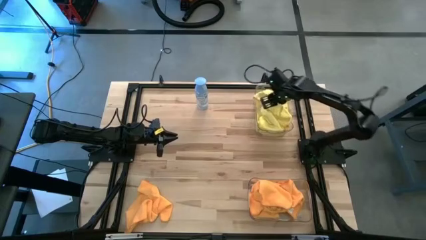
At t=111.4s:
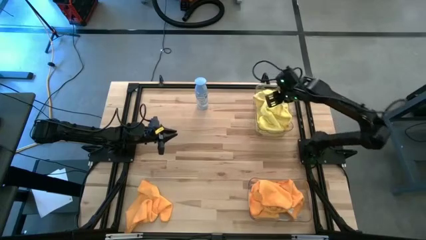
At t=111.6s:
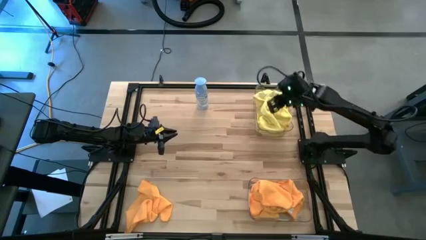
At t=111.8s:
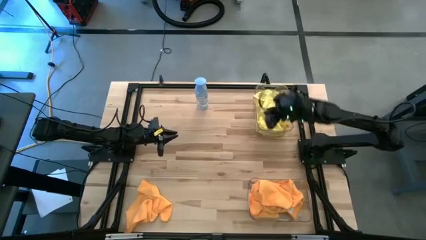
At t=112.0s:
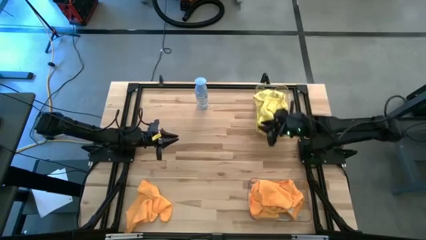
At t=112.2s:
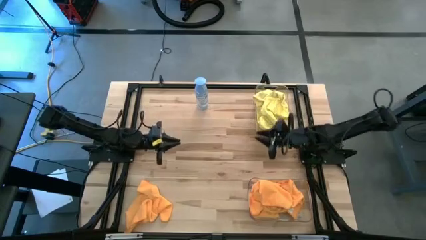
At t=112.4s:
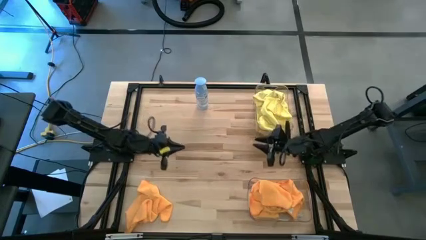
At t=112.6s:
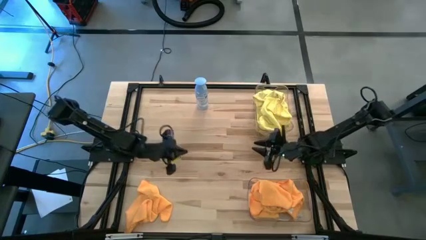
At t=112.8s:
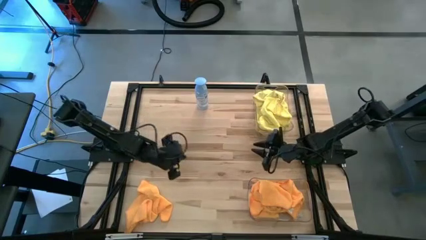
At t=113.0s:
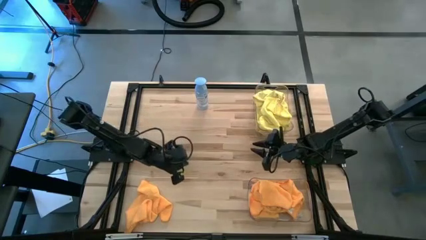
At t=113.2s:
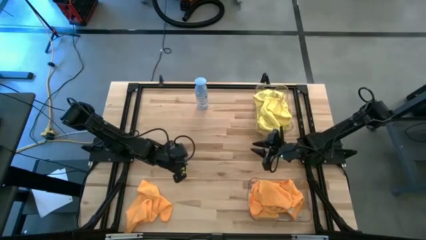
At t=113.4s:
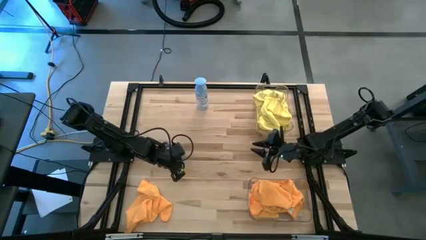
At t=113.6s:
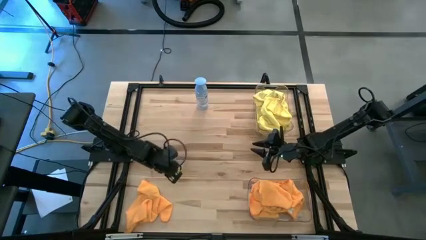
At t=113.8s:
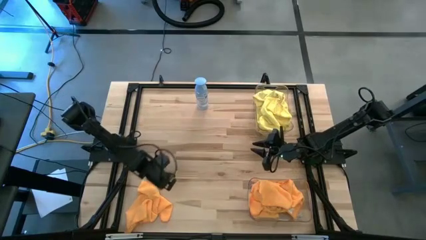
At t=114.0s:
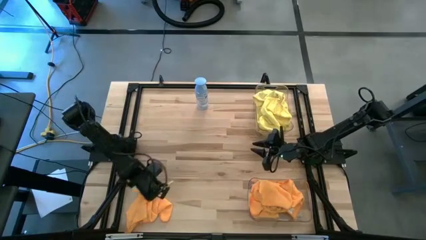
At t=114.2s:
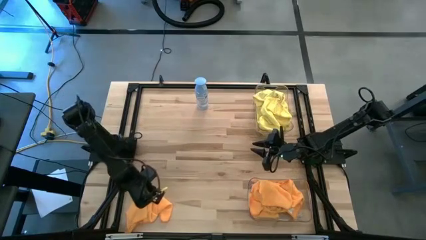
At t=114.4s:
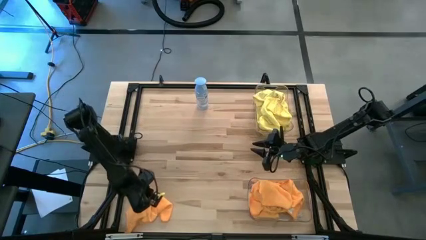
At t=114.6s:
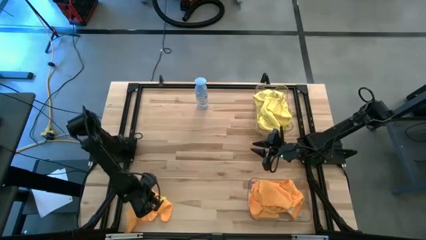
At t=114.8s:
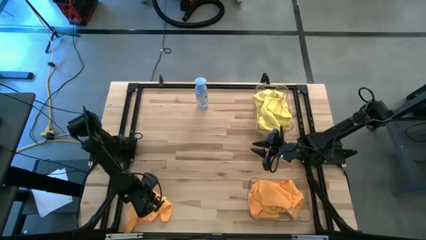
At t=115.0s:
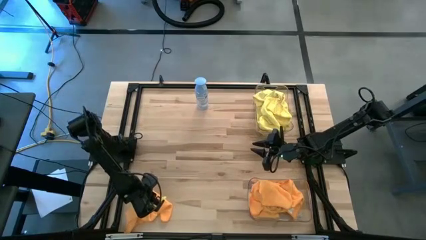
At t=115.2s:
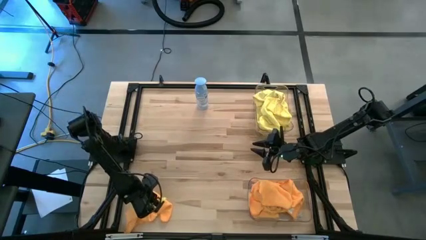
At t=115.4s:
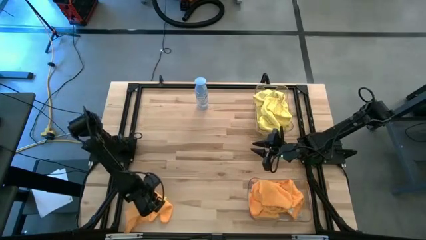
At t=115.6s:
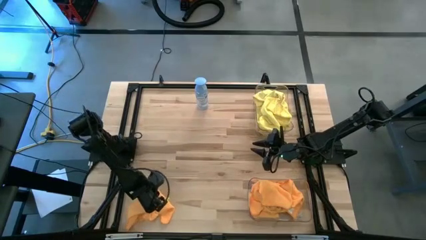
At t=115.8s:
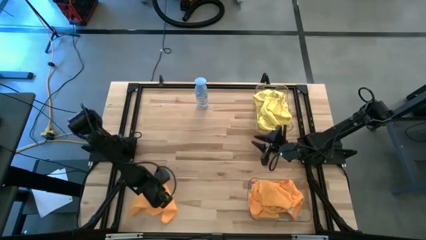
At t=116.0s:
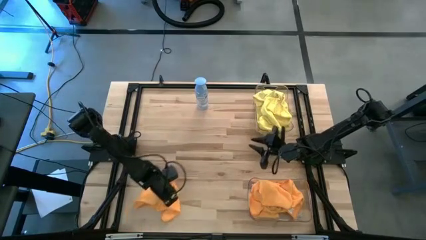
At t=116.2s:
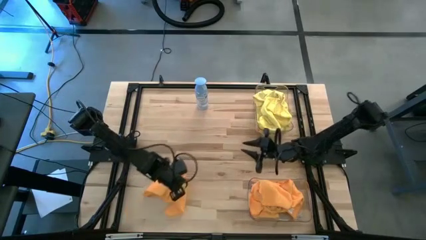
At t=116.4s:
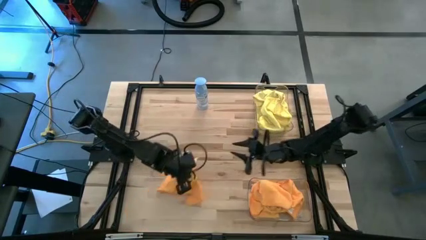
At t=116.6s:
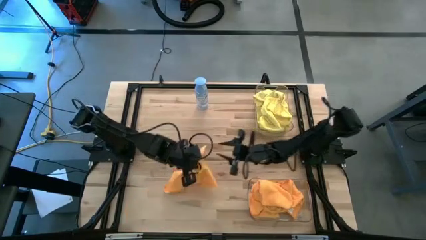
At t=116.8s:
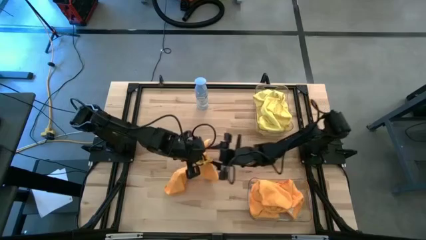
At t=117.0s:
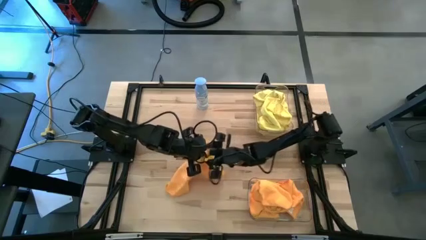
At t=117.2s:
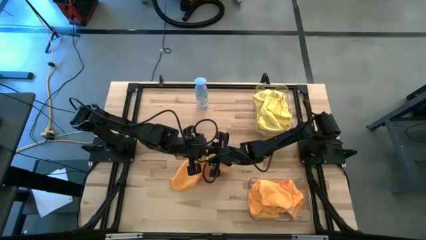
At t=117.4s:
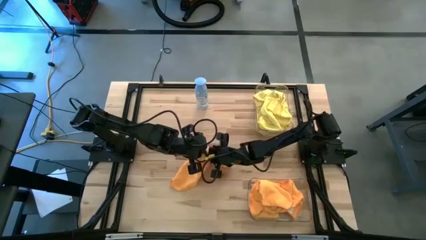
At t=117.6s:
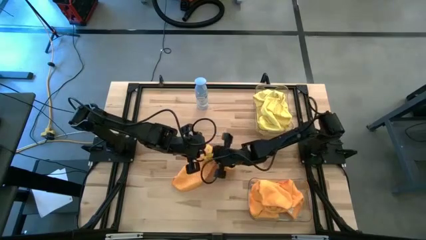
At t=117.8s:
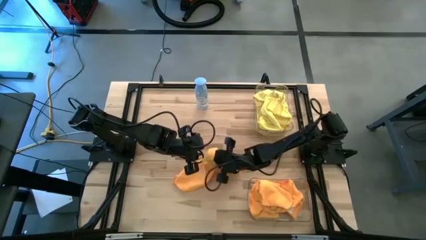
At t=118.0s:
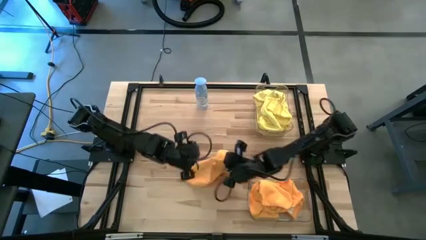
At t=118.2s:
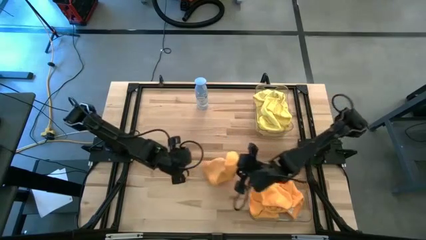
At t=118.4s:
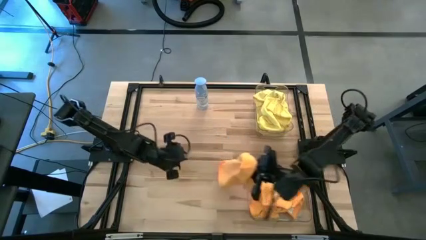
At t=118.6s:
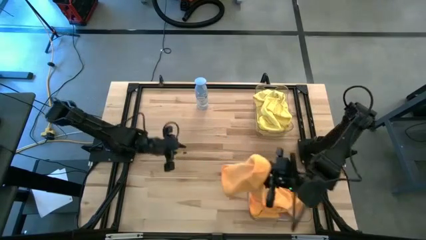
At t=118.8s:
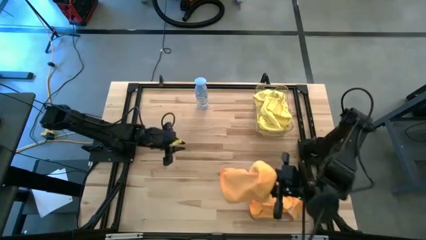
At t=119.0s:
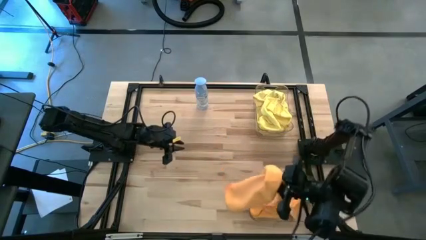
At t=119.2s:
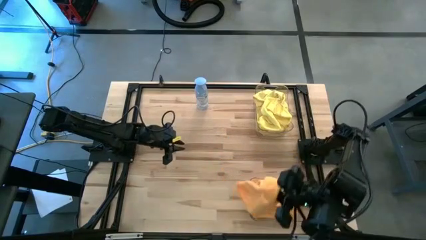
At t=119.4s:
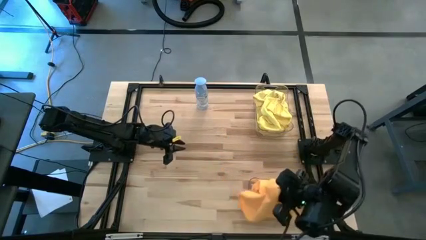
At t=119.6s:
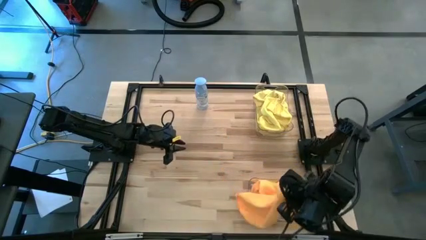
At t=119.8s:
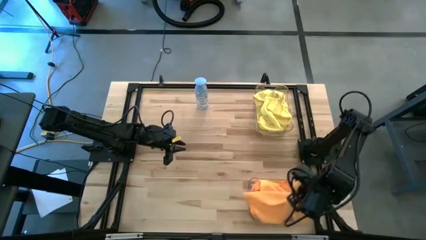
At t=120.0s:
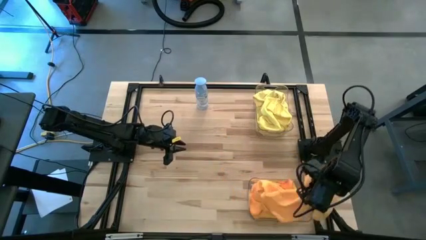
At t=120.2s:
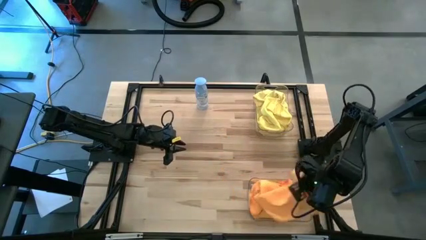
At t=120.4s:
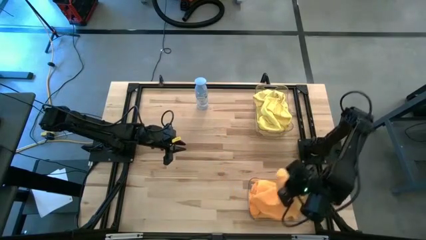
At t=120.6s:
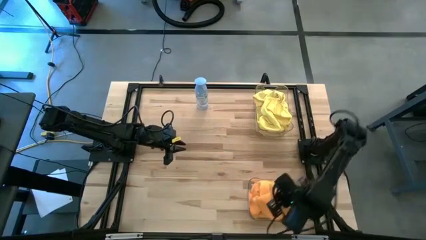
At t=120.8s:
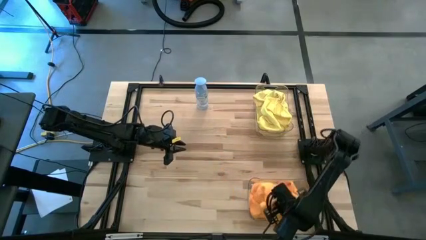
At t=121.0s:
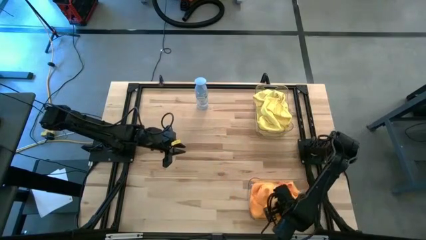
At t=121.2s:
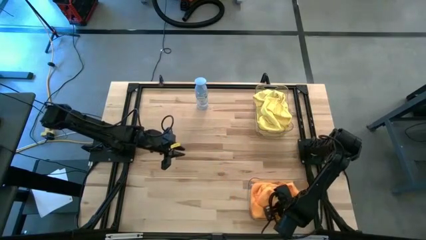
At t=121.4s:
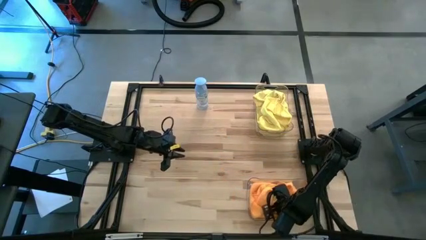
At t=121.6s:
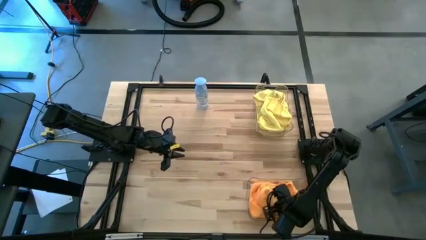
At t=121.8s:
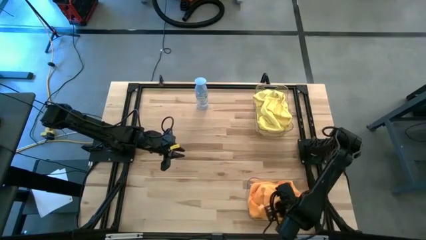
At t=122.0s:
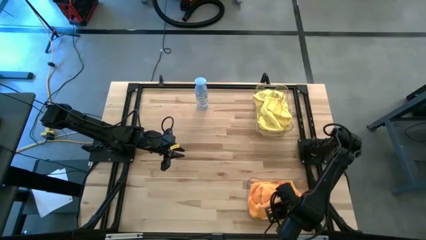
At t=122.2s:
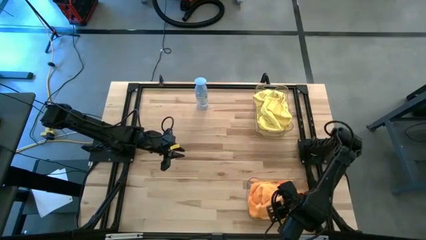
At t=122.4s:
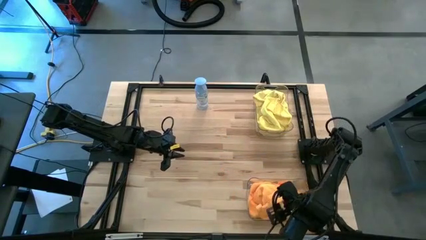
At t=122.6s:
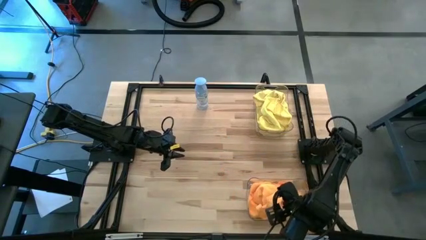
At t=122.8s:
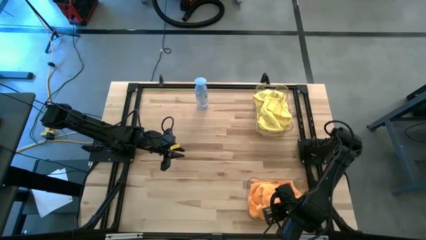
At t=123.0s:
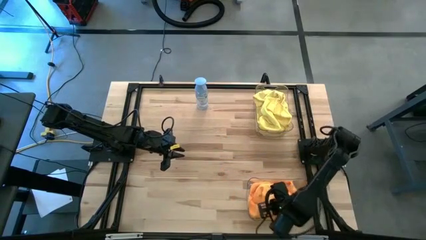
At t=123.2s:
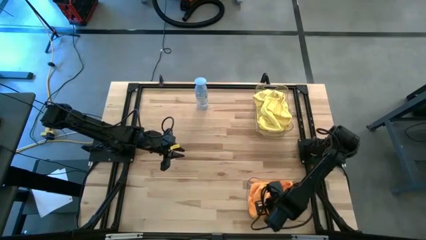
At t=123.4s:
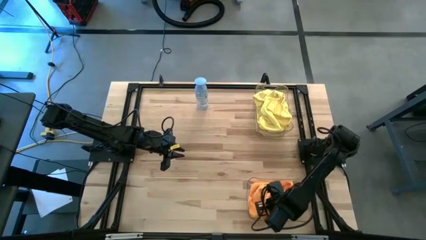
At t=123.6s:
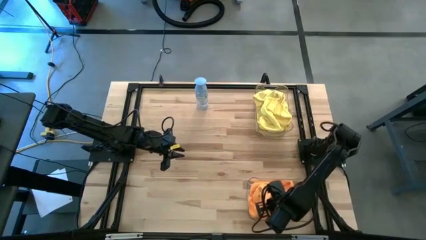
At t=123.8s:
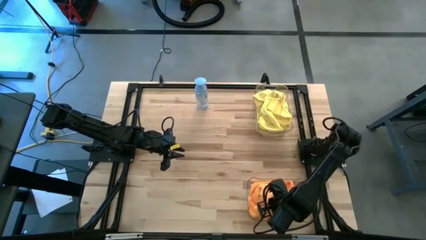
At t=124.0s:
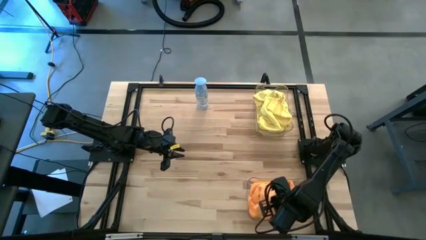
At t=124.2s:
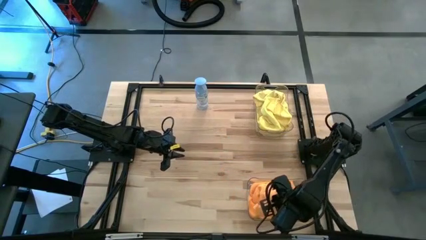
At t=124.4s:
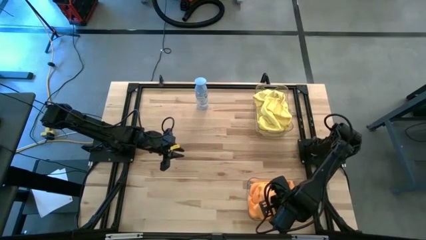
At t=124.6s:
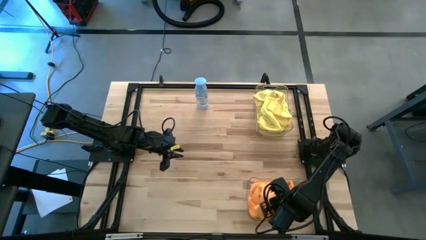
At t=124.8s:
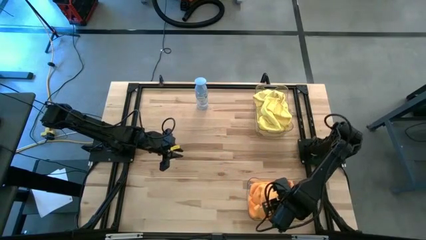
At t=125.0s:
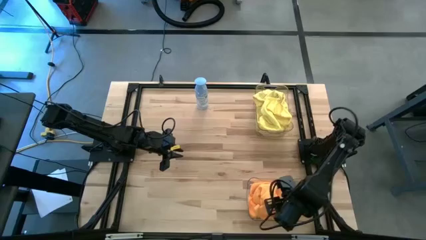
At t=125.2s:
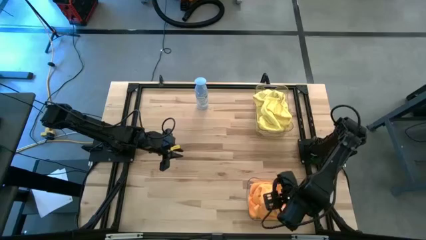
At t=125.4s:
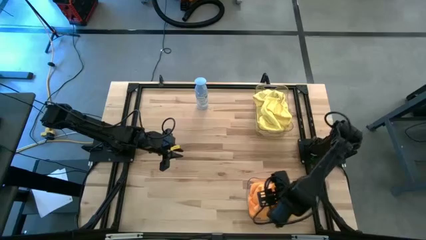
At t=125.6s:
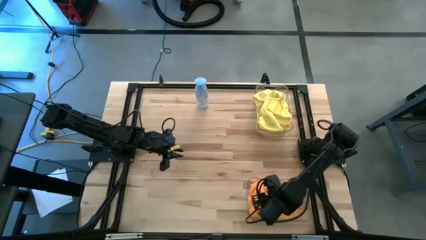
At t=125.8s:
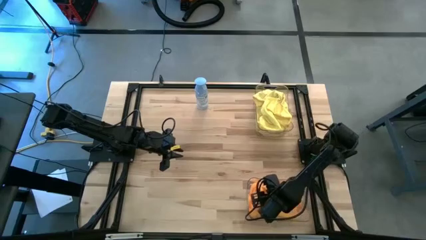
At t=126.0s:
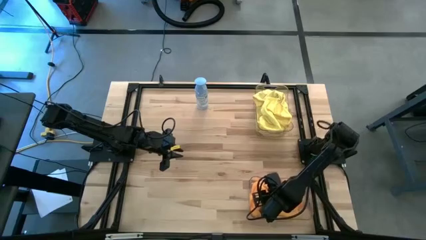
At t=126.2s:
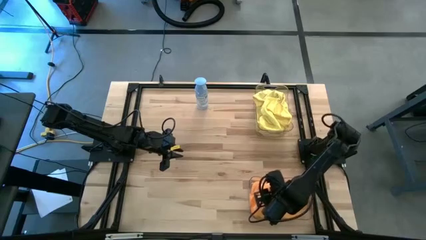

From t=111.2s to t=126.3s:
Task: Sort microfiber towel by color & place in baskets
Put the orange microfiber cloth into the bottom transparent bin

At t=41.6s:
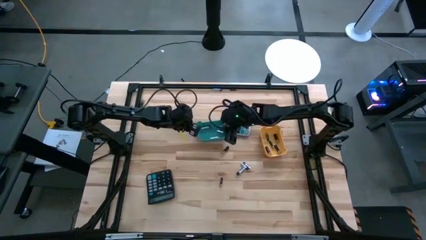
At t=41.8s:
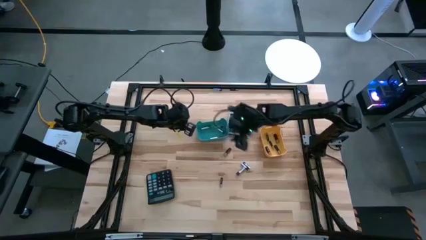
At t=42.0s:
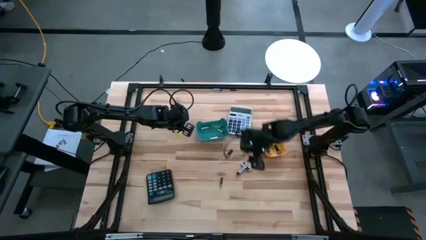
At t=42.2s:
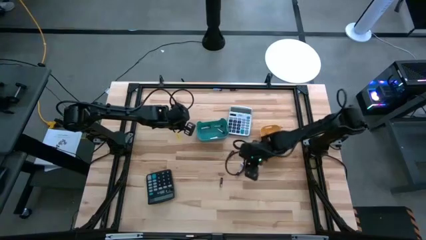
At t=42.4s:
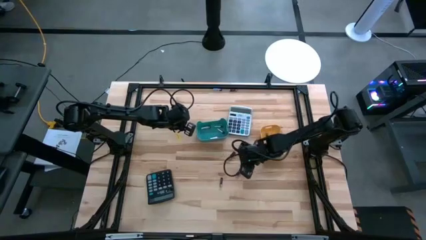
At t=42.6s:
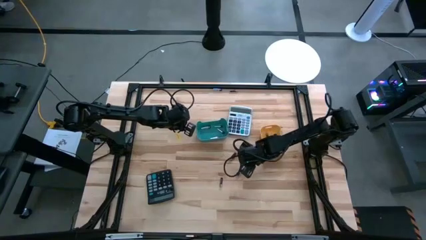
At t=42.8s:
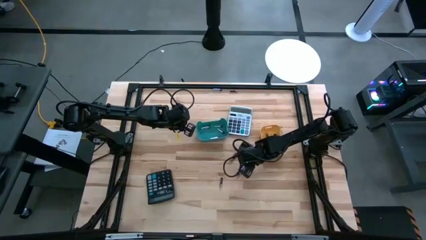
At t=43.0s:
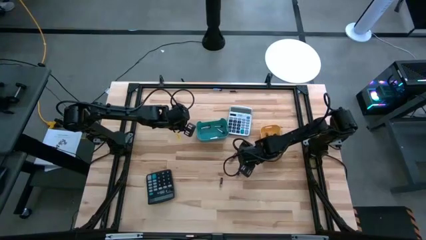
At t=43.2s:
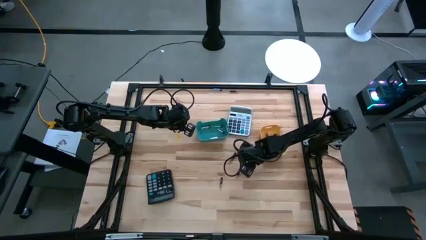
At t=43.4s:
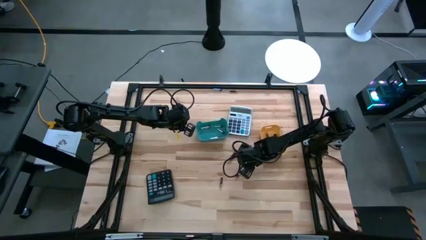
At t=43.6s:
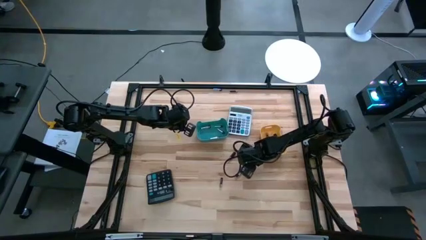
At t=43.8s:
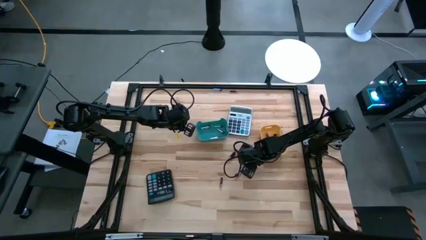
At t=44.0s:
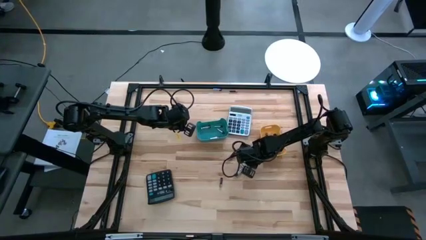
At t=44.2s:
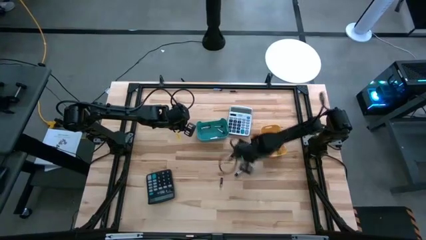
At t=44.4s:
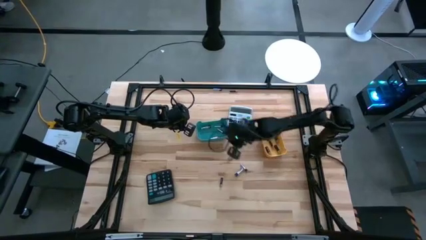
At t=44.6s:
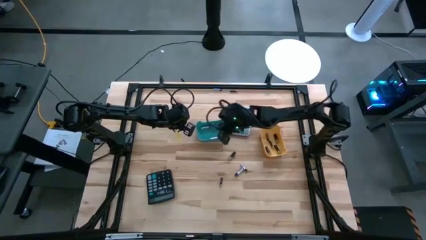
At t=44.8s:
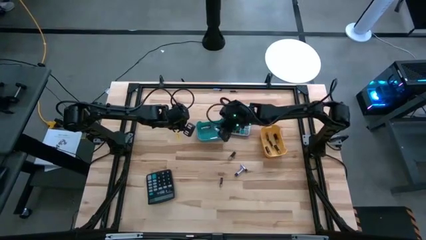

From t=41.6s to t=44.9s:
Task: Sort batteries
Put the silver battery into the blue bin
